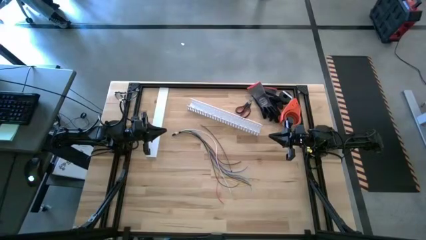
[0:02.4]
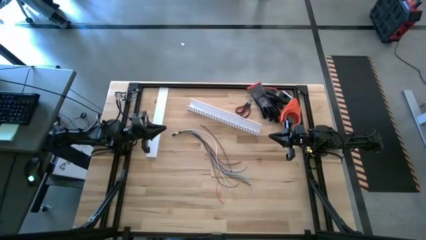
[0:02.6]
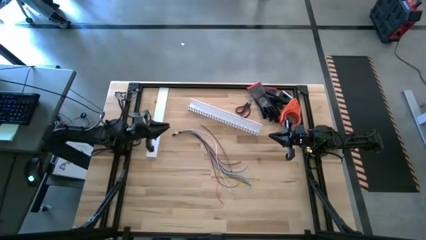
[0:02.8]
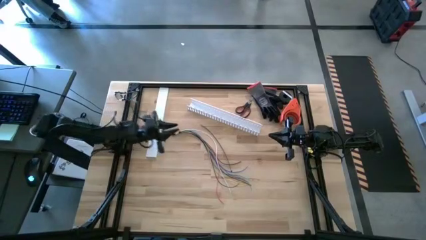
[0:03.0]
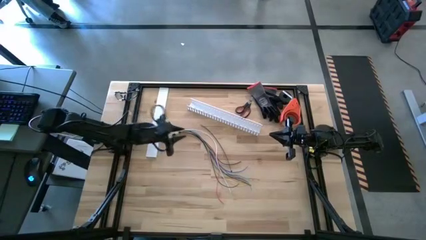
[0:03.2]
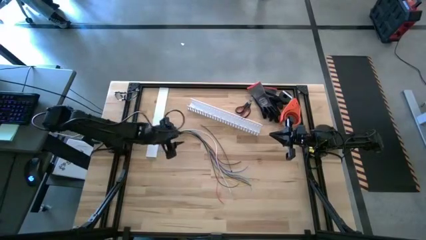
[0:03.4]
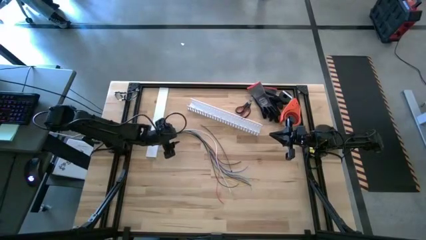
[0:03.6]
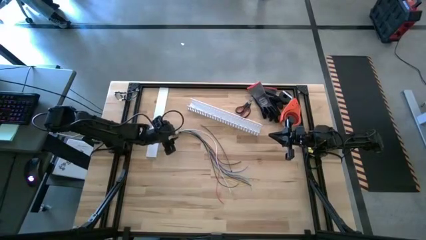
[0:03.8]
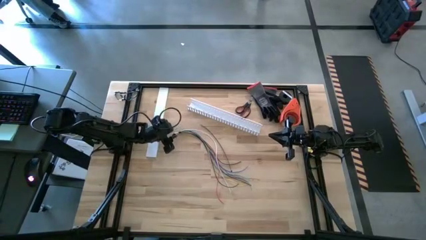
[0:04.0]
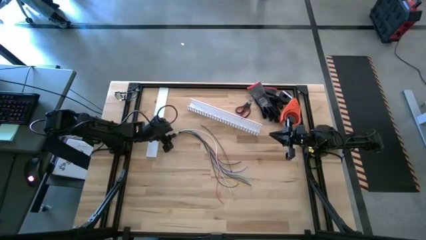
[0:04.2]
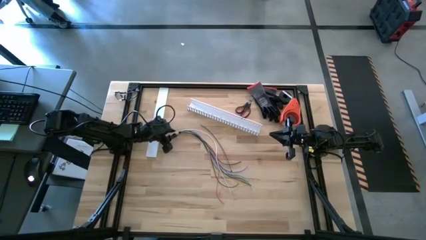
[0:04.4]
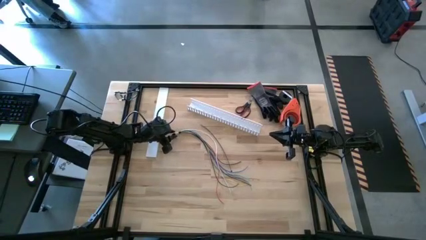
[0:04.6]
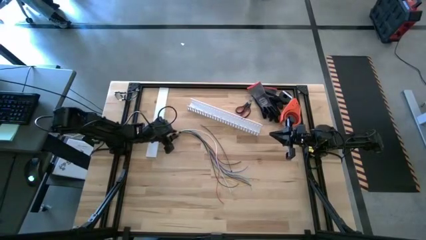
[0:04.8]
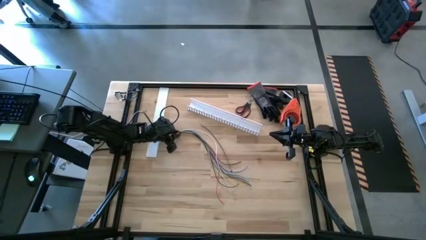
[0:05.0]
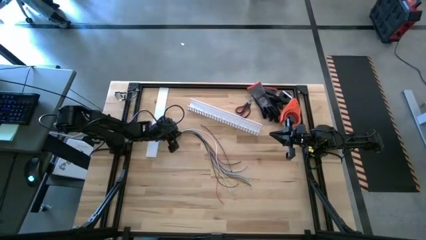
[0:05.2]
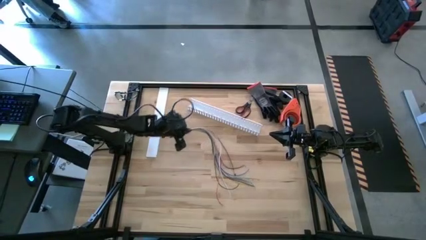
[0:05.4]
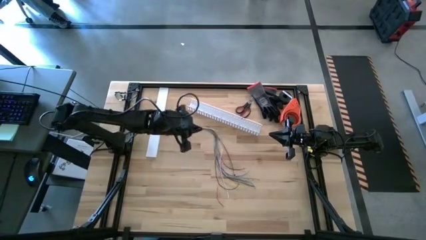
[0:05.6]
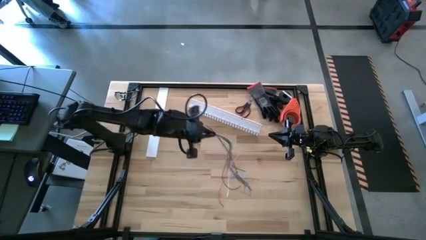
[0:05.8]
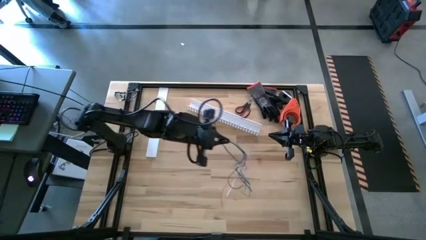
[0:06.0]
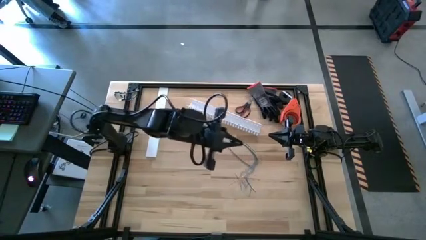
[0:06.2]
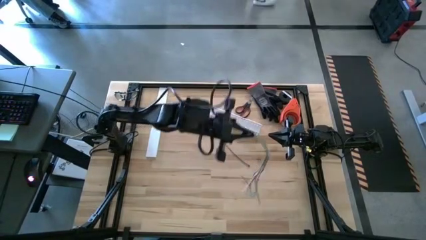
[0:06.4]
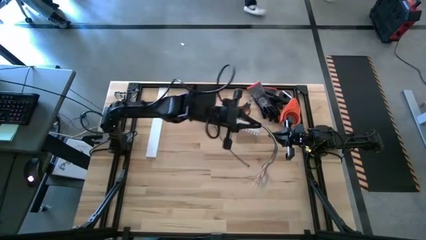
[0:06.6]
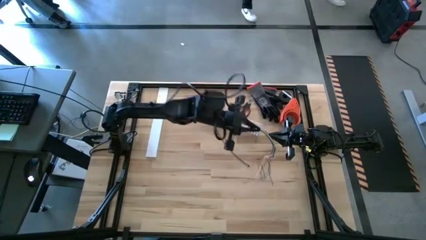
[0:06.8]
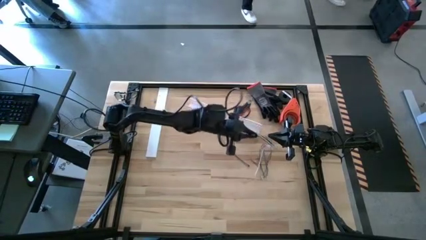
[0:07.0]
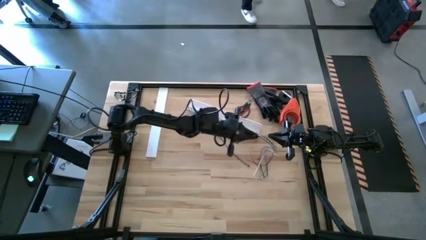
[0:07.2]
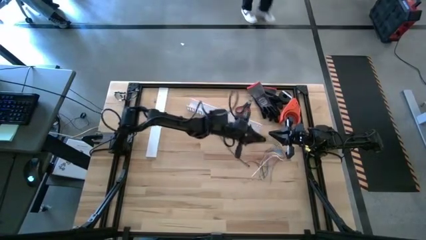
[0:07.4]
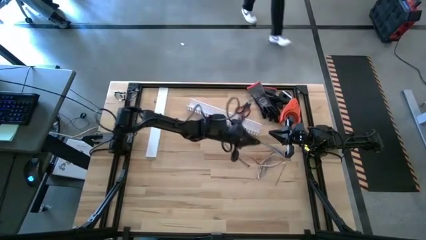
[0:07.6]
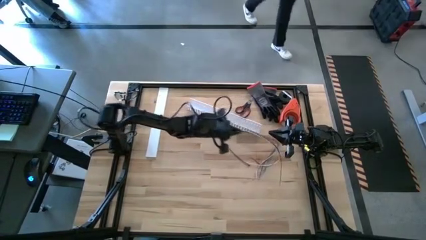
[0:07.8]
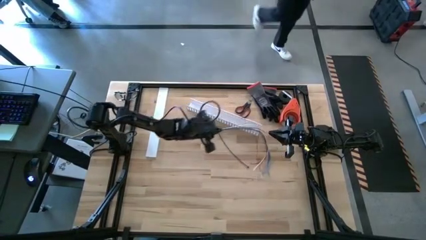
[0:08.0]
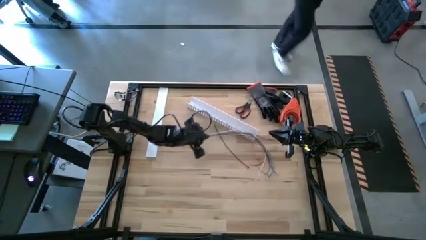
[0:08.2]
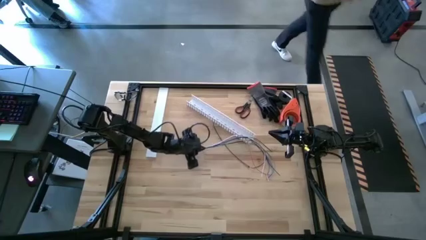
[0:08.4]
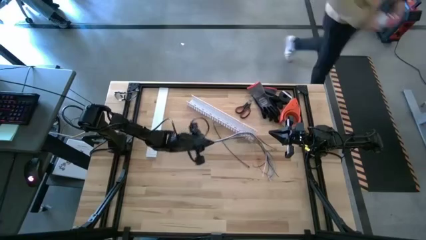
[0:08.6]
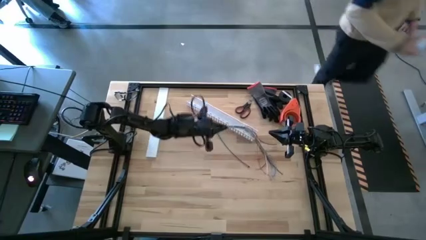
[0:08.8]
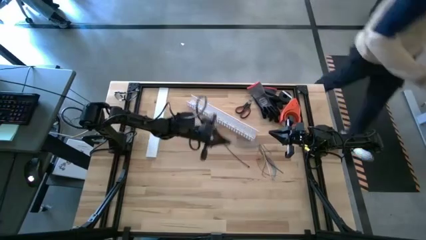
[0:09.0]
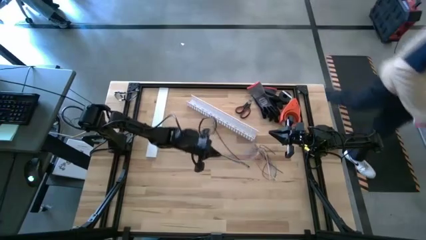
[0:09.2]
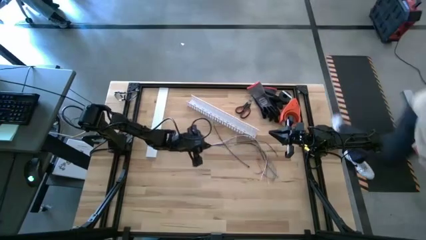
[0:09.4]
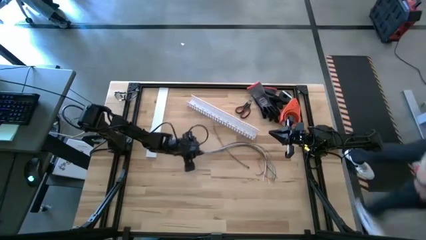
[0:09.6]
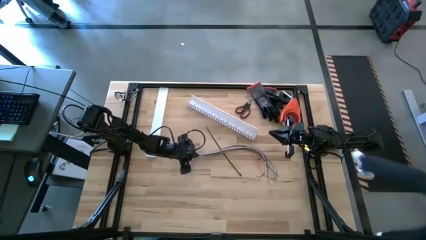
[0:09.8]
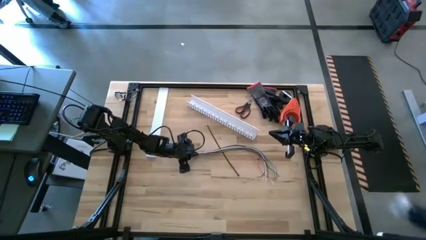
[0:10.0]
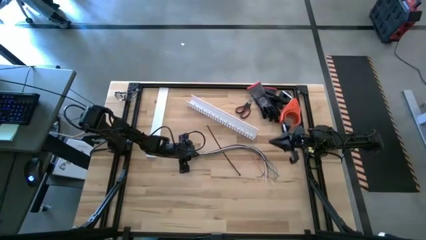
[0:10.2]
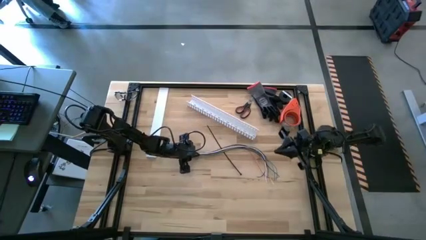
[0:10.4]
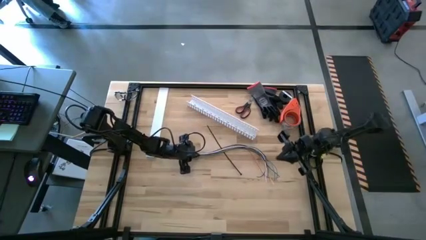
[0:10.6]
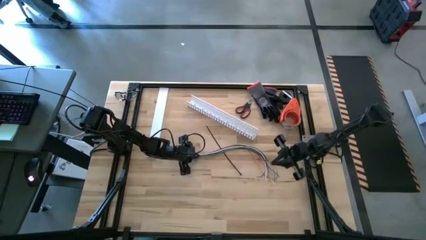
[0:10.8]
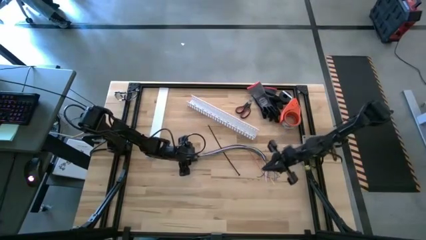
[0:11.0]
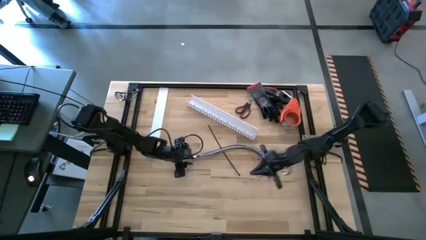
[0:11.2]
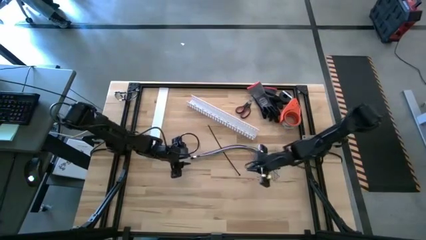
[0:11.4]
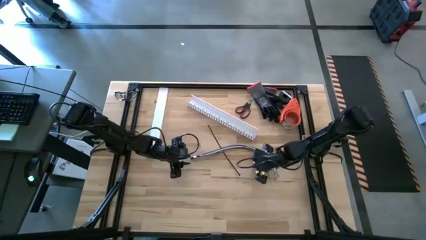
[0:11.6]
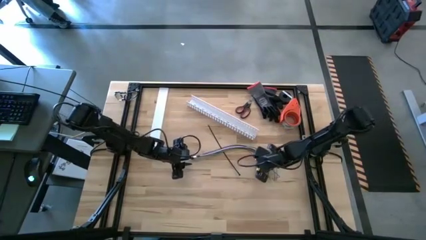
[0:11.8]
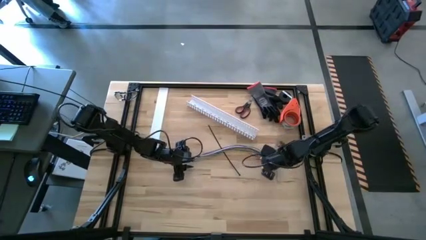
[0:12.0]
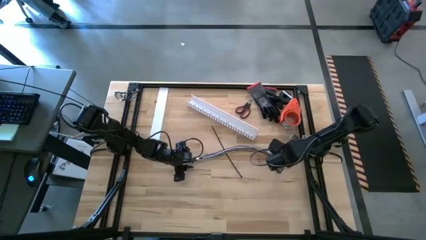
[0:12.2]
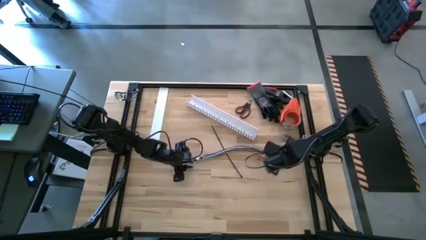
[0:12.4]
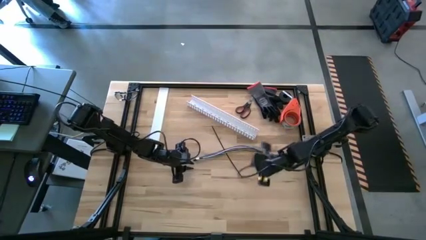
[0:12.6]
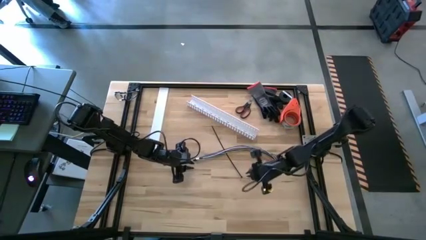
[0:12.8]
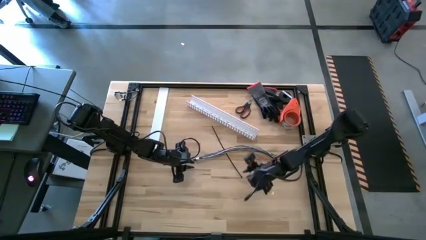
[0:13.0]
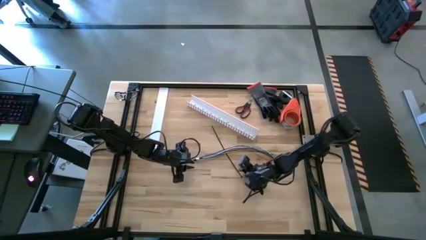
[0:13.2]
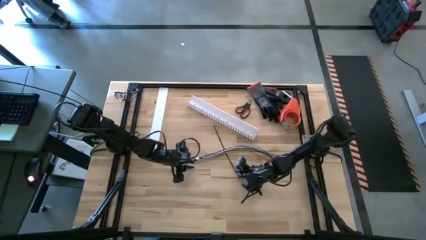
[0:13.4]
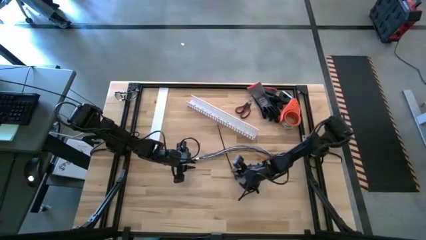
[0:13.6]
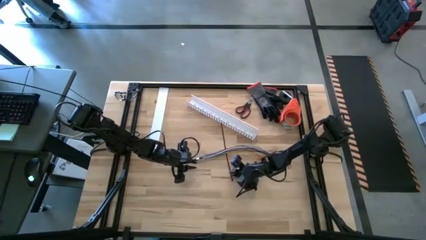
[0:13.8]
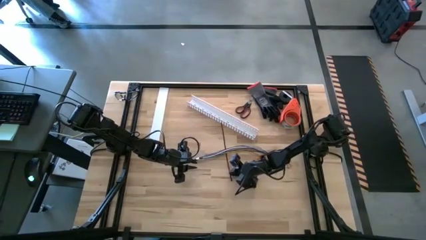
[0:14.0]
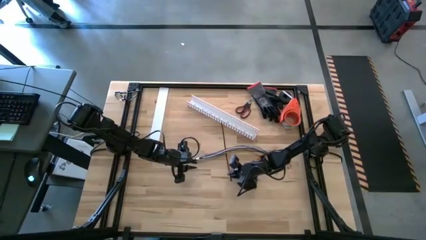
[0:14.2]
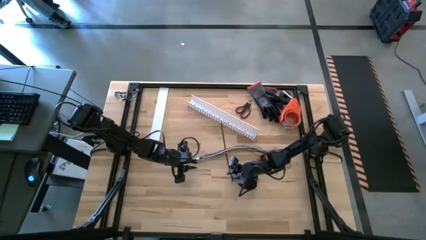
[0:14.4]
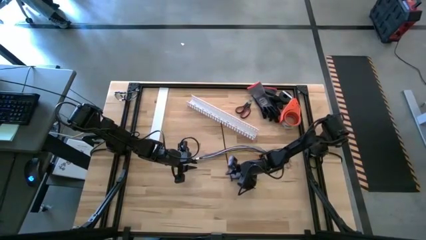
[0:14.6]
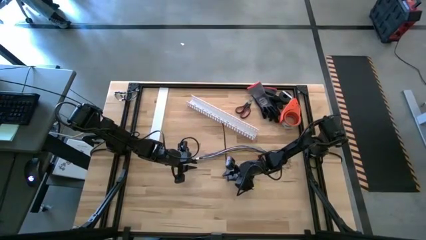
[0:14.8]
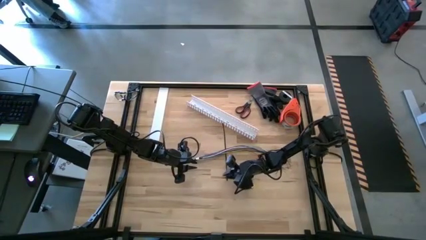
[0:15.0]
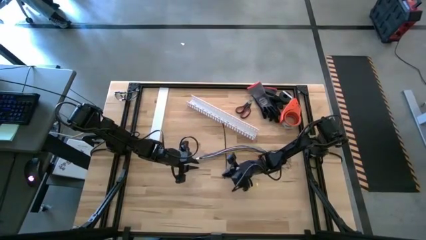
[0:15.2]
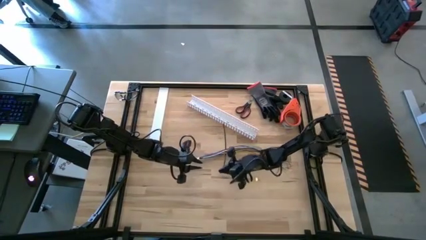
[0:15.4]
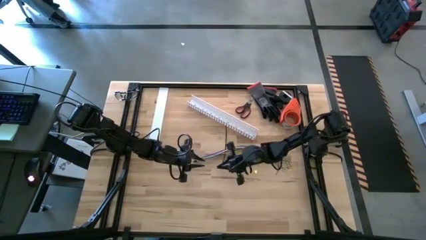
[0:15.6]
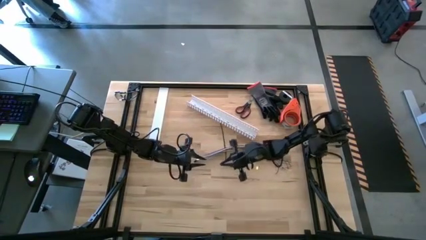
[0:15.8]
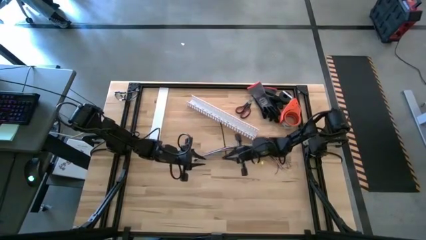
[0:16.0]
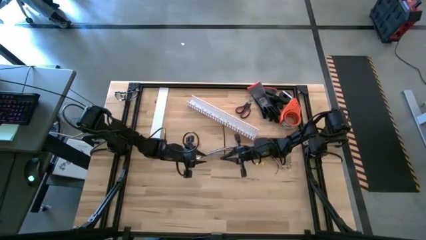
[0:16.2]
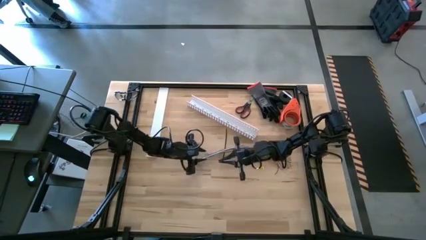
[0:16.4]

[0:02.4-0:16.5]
Task: Ziptie cables
Wrap the black zip tie on the cable wires
